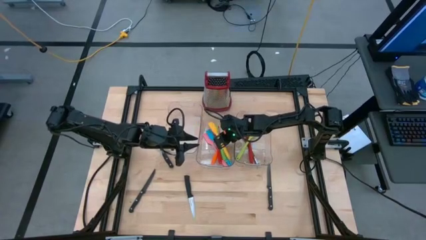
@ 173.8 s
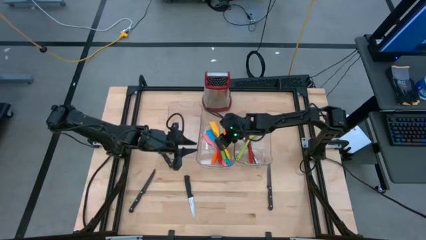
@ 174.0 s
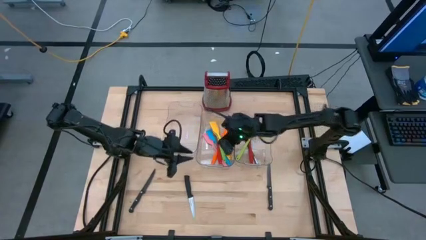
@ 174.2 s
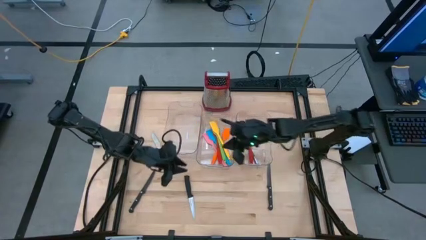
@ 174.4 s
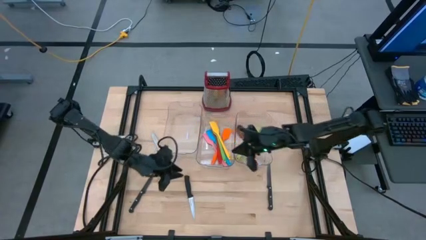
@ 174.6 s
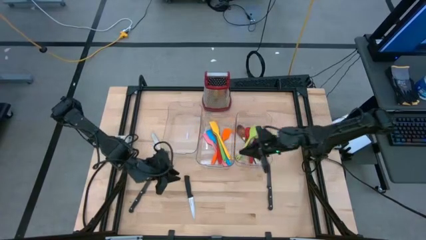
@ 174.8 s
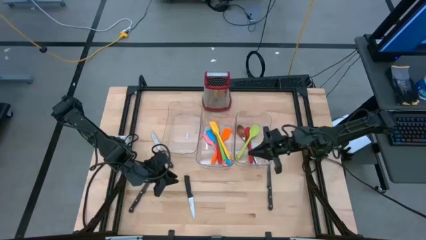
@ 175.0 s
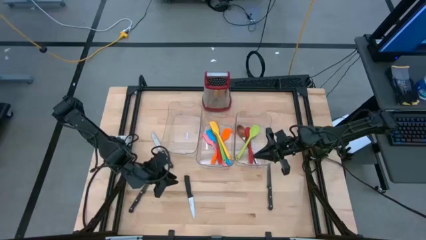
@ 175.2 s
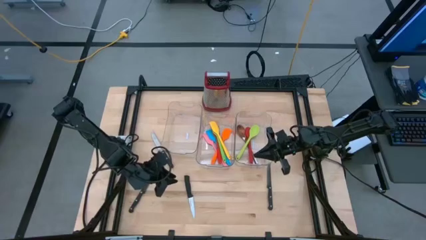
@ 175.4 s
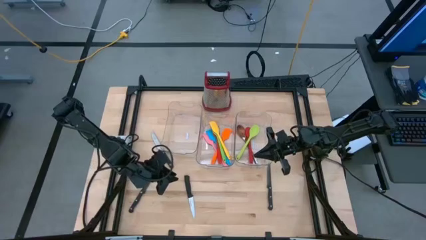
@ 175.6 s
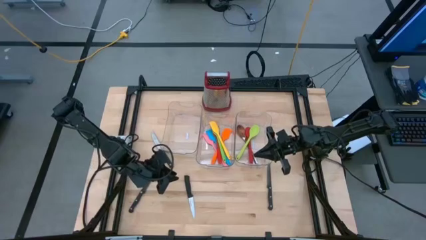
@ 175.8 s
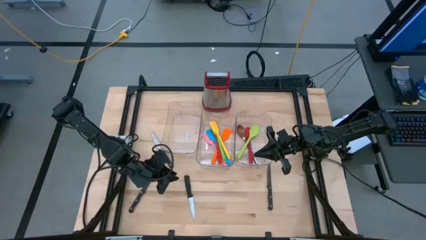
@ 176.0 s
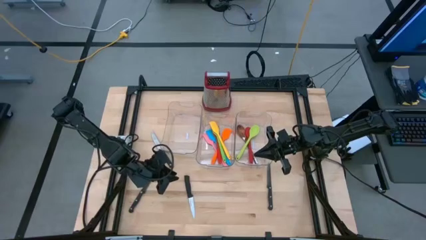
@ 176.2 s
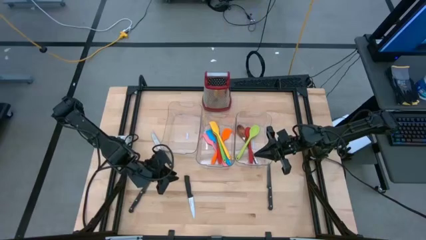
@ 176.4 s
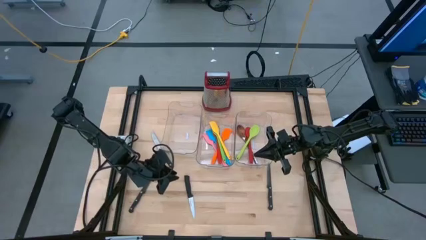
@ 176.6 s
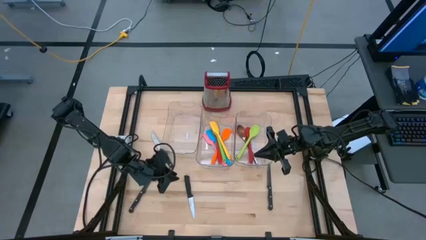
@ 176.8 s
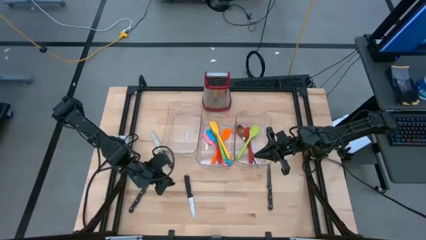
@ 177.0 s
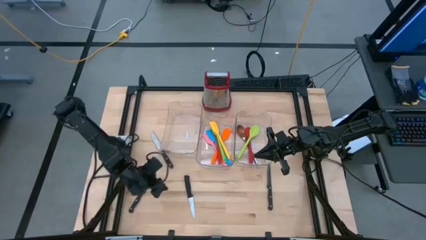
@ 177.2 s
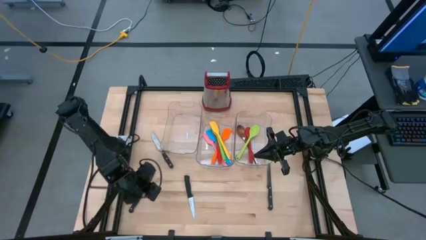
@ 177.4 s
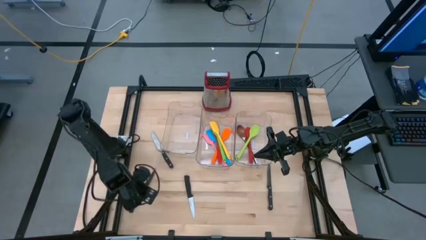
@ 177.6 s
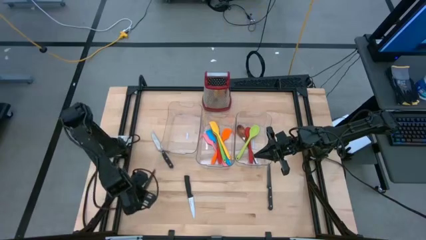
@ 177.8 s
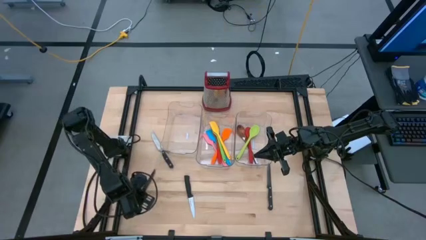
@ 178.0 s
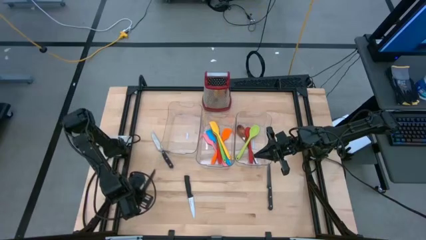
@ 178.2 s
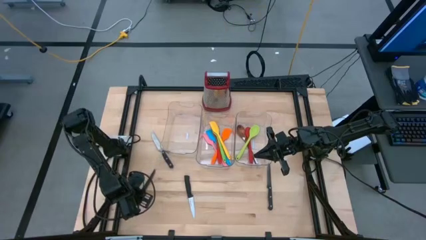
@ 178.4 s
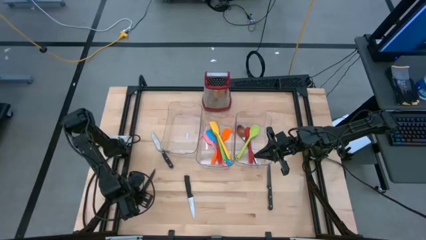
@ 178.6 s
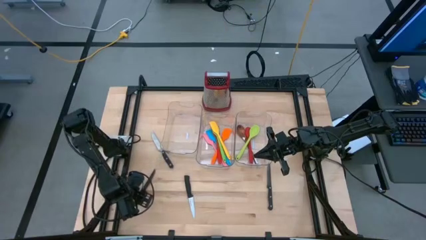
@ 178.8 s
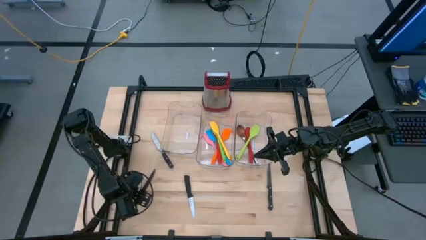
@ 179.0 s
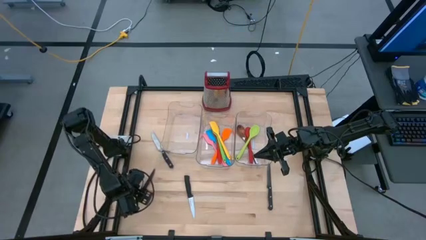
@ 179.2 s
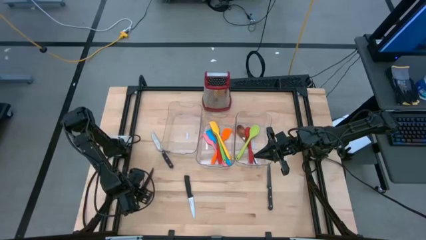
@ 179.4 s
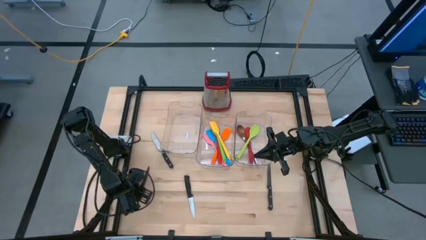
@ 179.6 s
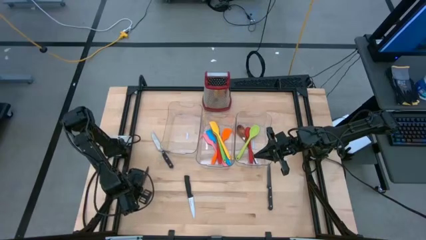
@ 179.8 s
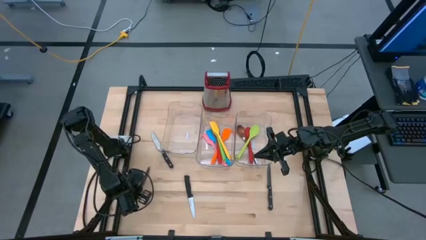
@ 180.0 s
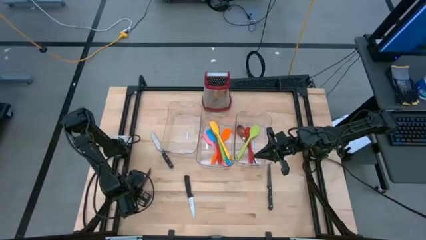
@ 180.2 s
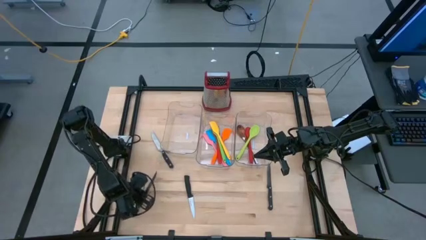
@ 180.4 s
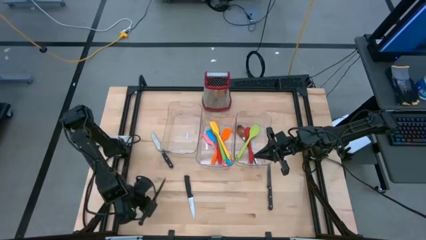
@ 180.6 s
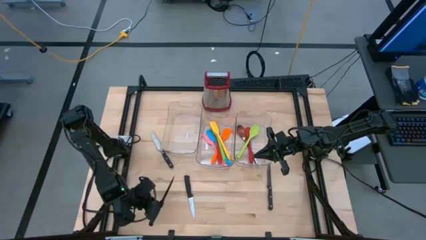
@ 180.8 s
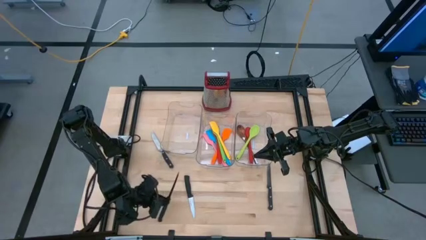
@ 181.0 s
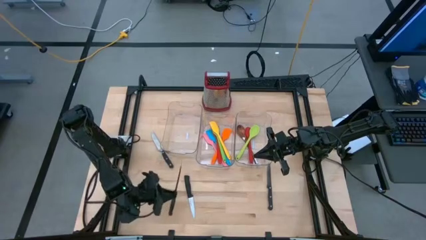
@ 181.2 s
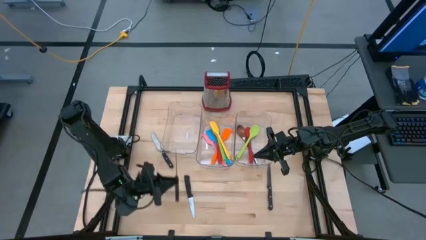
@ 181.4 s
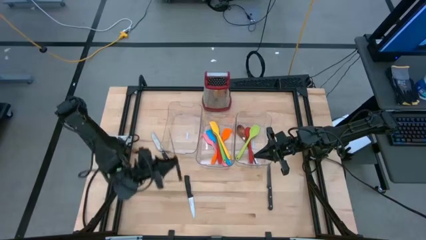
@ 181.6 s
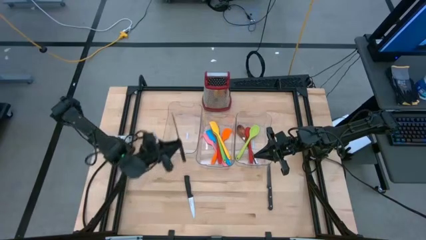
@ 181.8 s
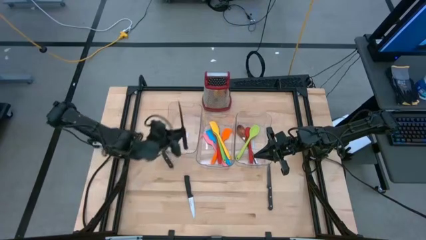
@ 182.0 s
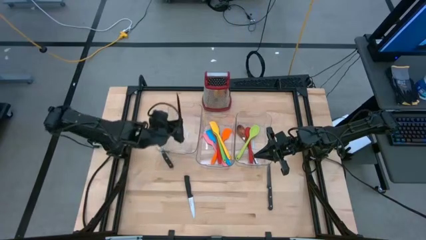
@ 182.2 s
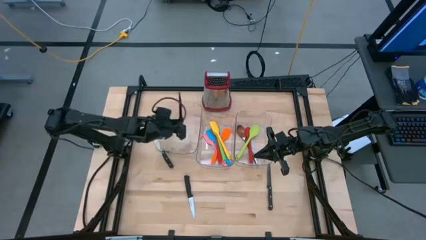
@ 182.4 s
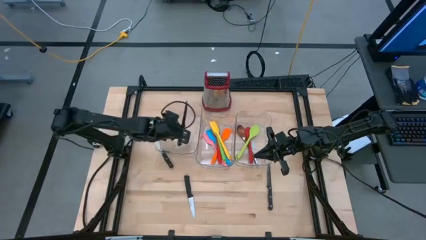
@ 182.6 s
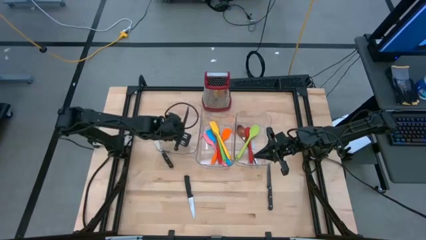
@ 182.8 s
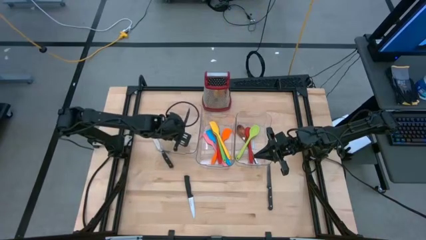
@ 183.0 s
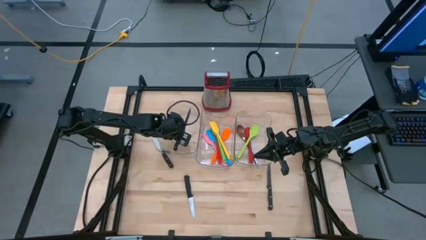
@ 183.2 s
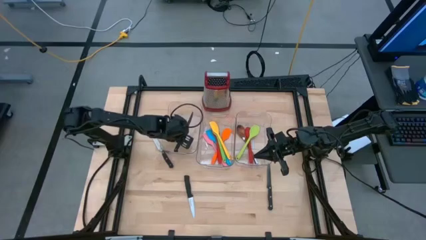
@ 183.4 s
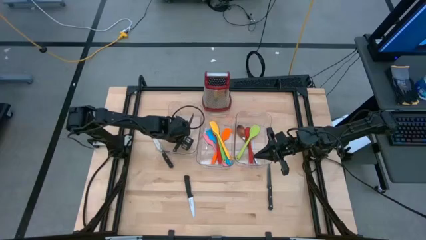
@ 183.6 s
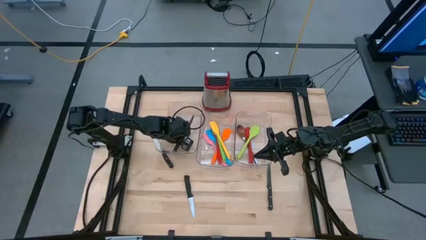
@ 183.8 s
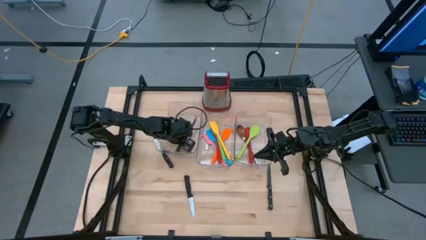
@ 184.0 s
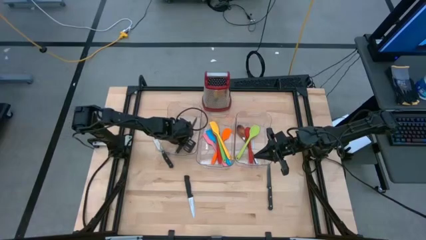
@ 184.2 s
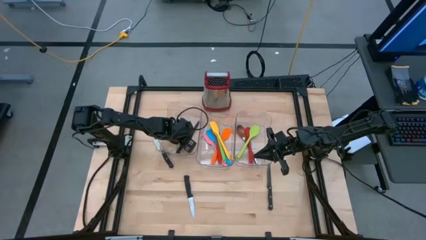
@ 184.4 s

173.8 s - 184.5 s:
Task: Pick & Place Kitchen Items
Put the black knife into the left transparent bin

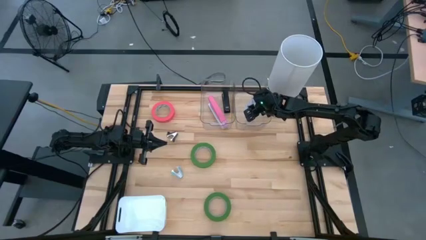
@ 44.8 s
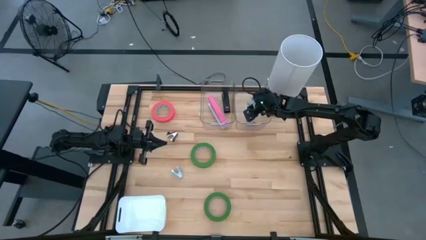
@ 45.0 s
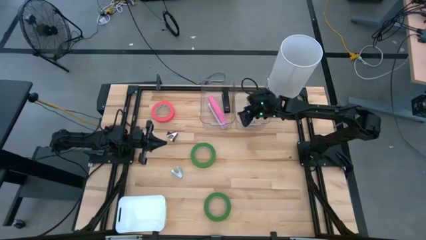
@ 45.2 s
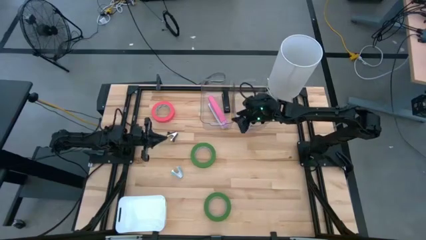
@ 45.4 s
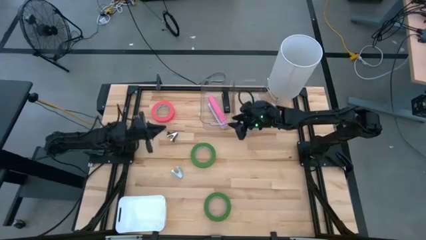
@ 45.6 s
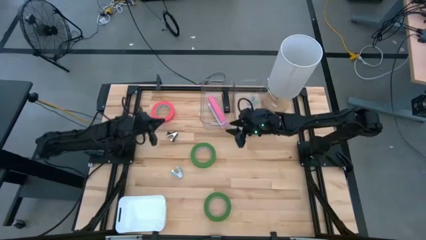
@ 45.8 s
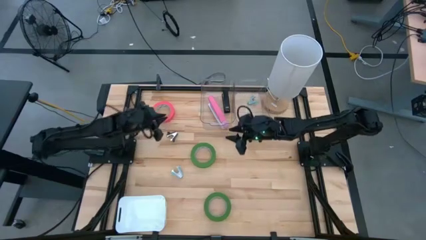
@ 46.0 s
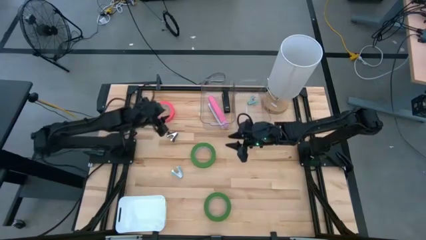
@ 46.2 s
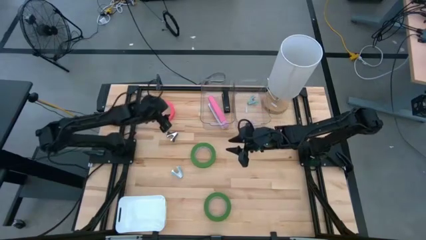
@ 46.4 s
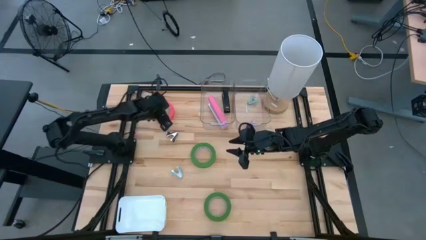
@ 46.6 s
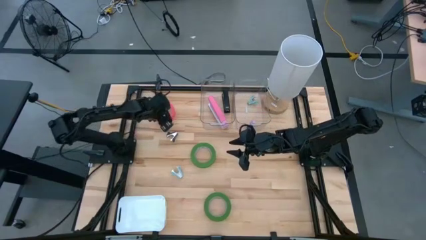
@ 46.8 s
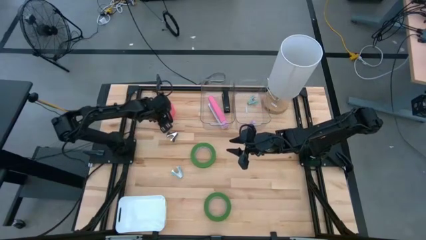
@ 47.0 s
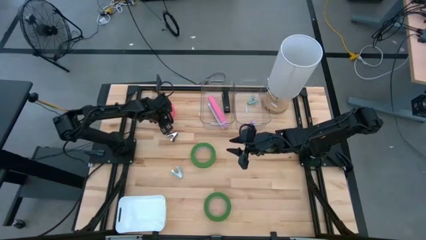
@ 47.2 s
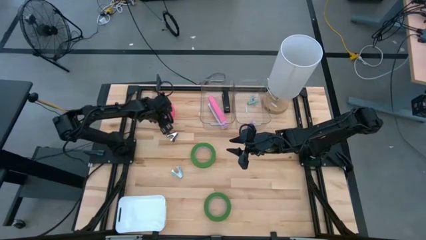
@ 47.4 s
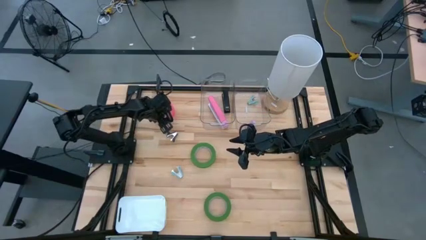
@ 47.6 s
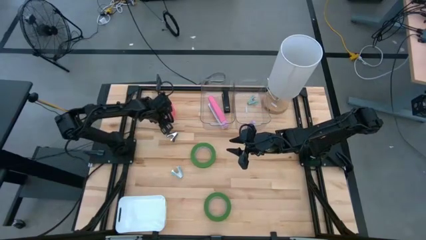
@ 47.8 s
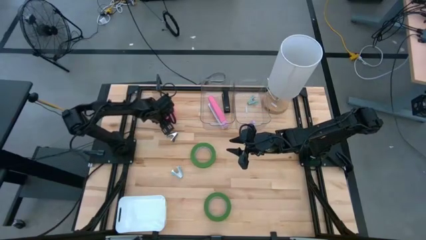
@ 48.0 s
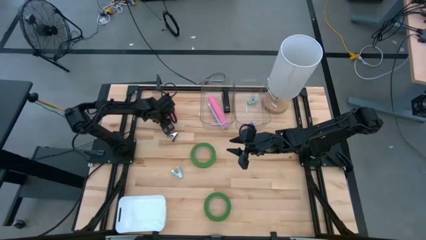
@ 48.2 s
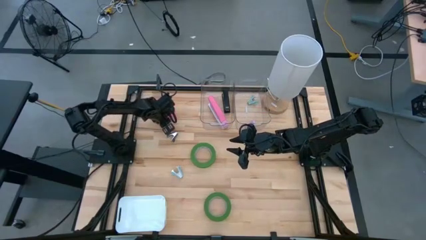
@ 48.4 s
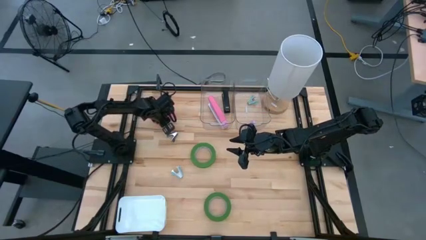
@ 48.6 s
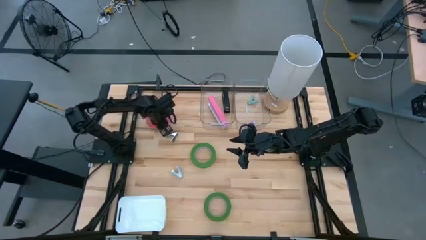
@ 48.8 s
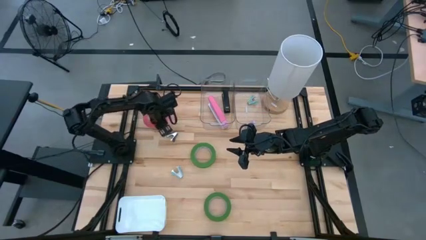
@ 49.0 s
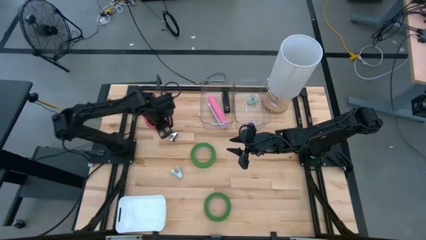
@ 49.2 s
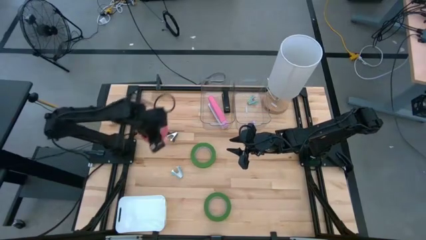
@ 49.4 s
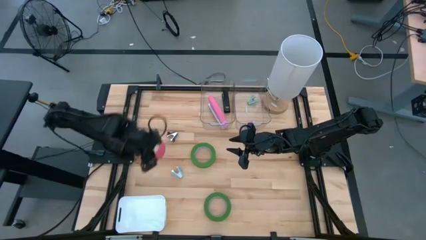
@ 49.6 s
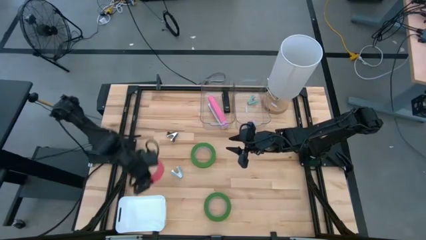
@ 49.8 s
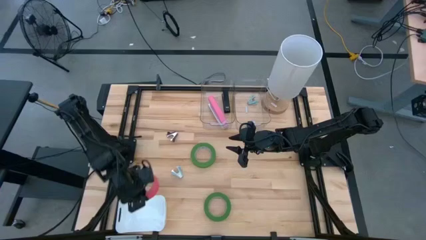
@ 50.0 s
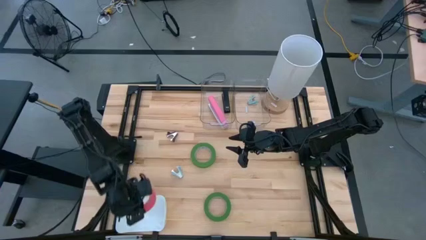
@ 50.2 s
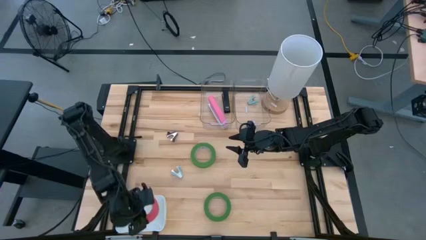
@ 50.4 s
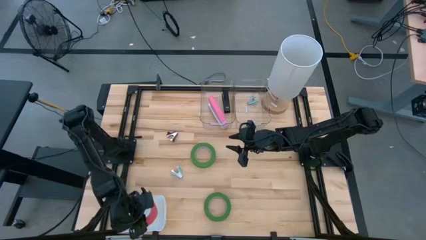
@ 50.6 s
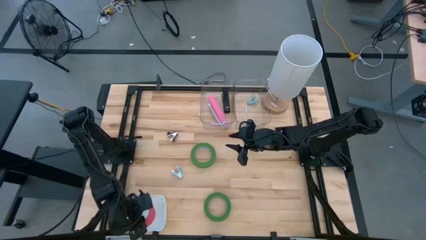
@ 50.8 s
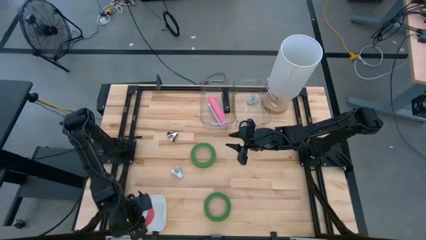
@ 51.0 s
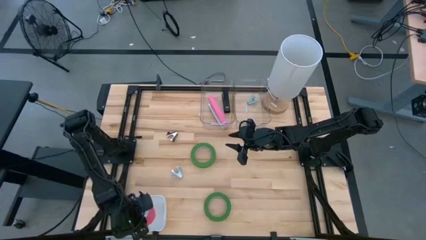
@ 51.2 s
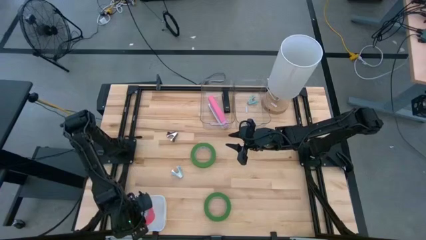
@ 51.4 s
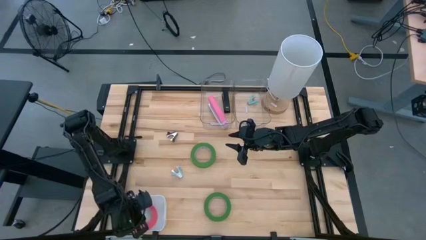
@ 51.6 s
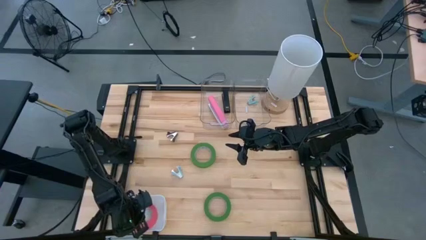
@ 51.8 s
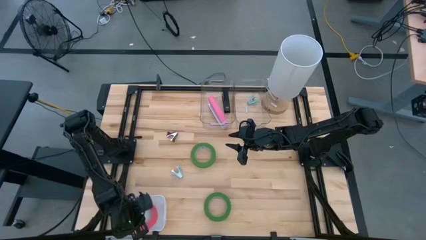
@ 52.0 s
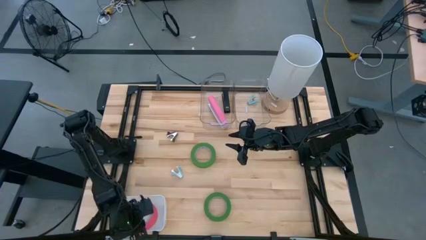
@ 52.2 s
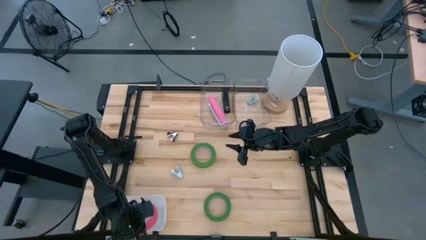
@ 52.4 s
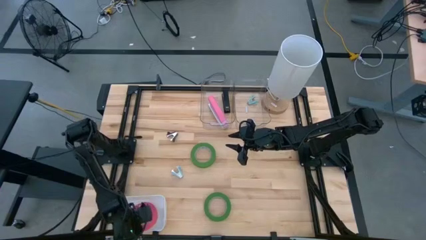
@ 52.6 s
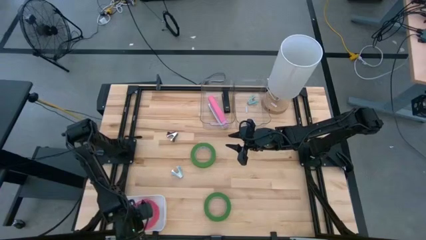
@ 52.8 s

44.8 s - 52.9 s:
Task: Pick and place Stapler, Stapler remover, tape
Put the pink tape into the white bin
